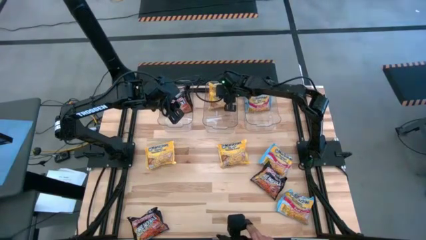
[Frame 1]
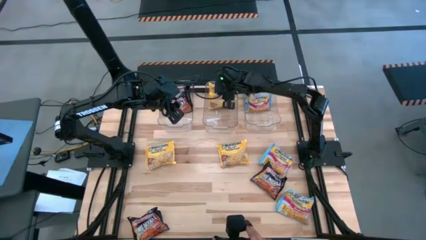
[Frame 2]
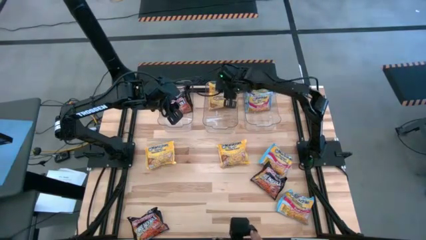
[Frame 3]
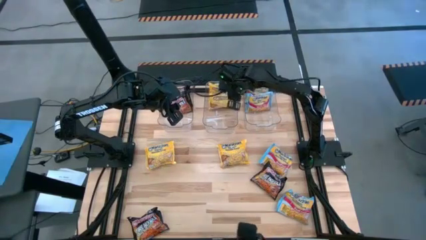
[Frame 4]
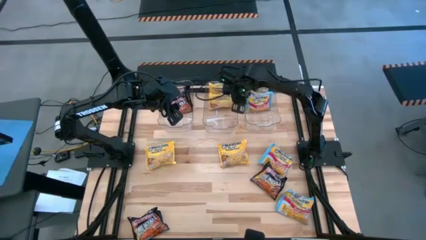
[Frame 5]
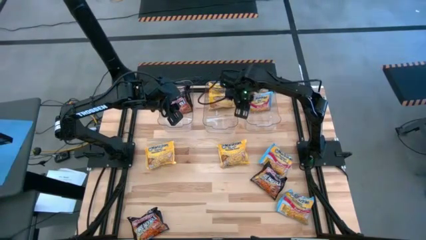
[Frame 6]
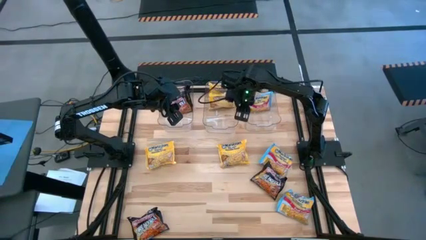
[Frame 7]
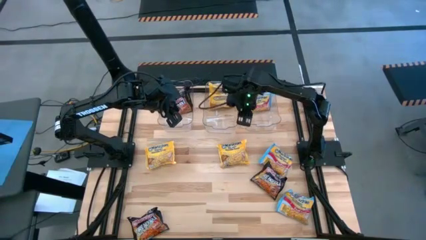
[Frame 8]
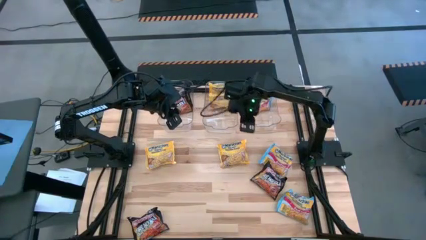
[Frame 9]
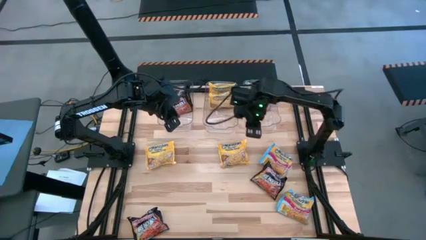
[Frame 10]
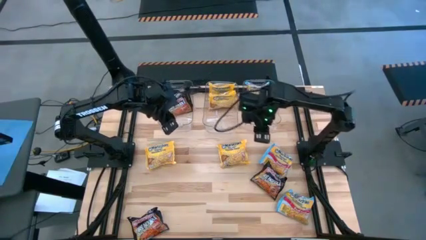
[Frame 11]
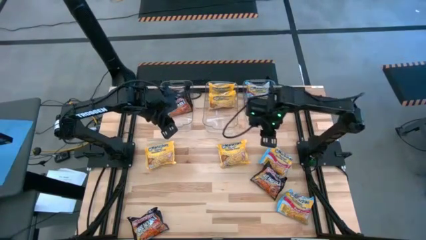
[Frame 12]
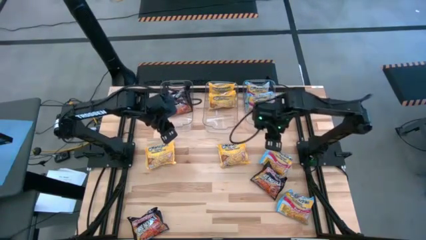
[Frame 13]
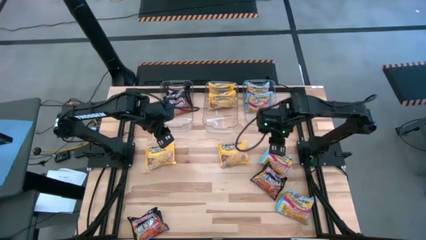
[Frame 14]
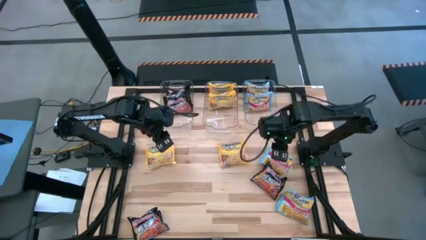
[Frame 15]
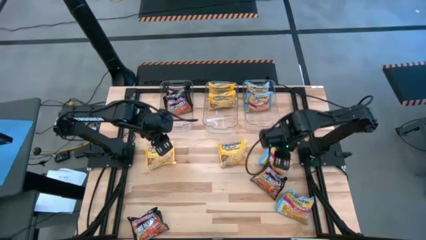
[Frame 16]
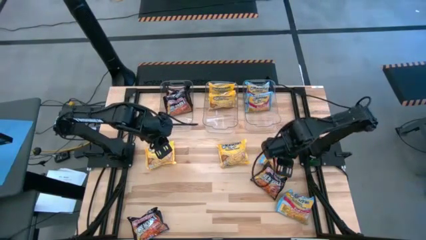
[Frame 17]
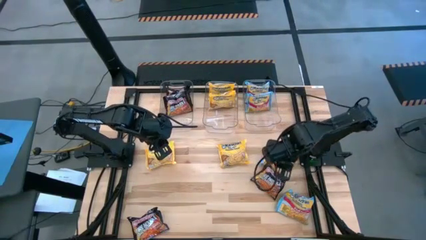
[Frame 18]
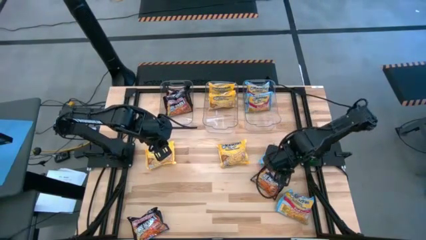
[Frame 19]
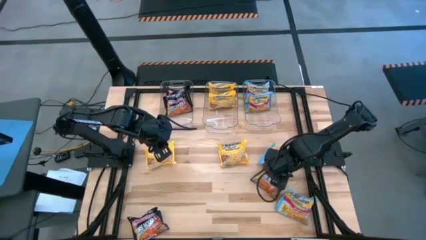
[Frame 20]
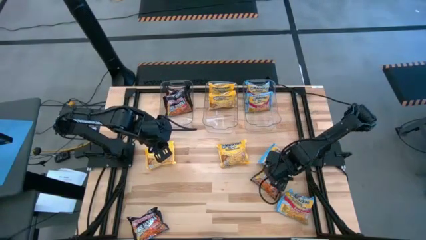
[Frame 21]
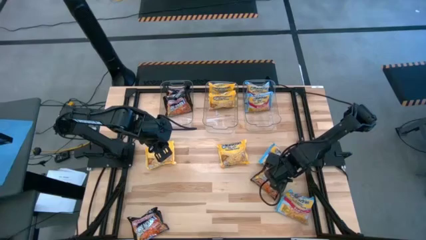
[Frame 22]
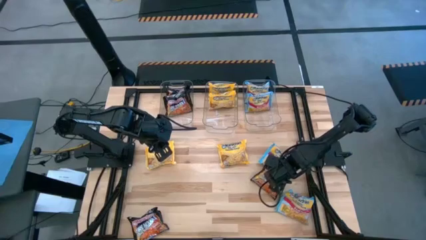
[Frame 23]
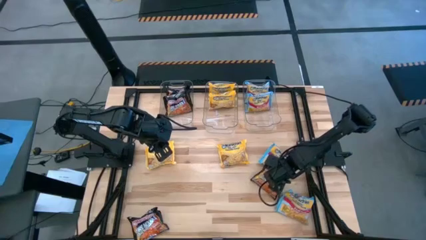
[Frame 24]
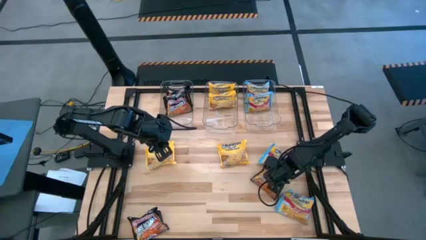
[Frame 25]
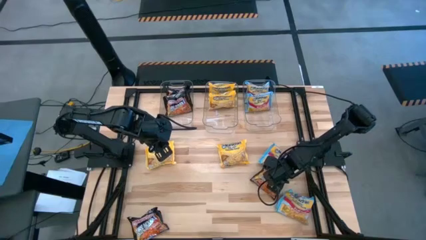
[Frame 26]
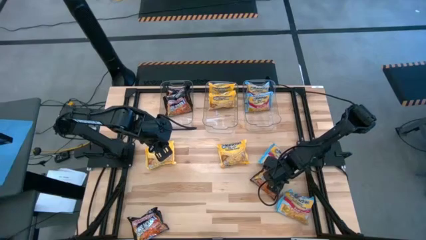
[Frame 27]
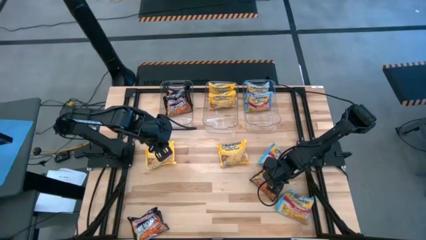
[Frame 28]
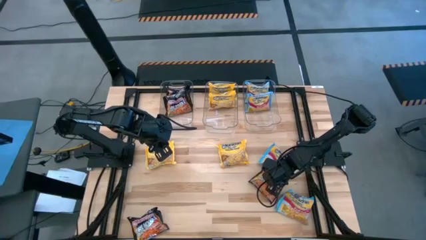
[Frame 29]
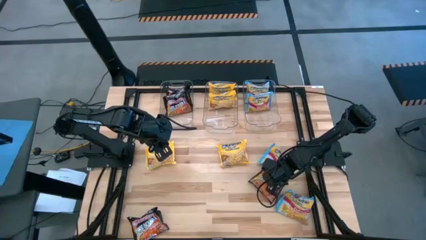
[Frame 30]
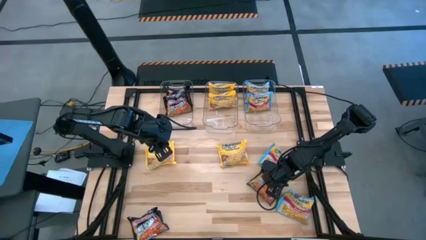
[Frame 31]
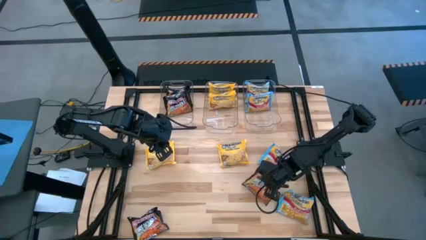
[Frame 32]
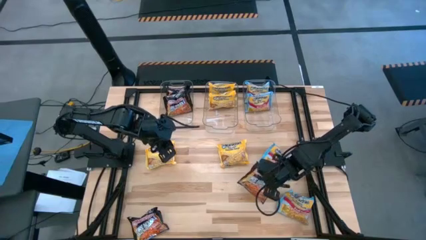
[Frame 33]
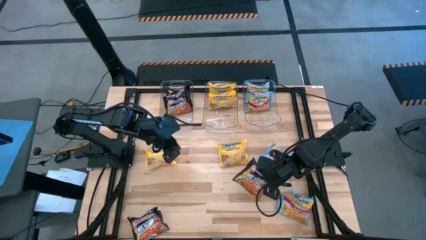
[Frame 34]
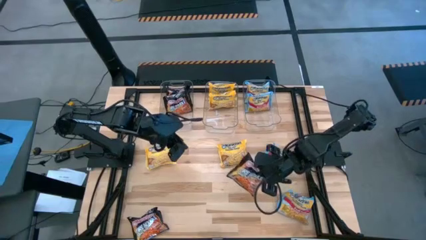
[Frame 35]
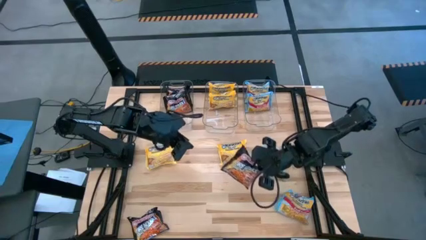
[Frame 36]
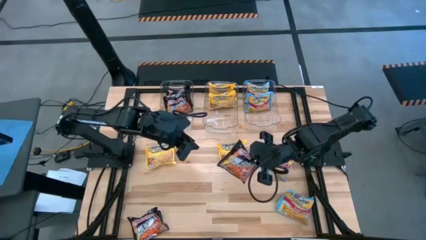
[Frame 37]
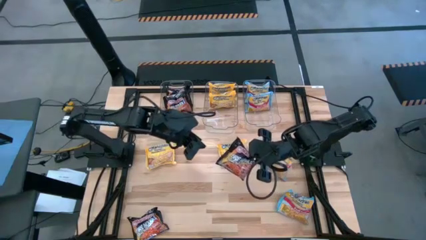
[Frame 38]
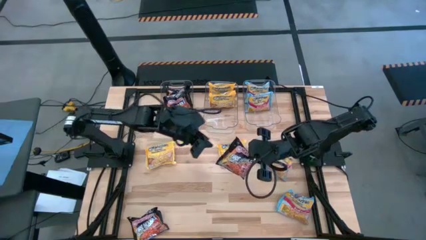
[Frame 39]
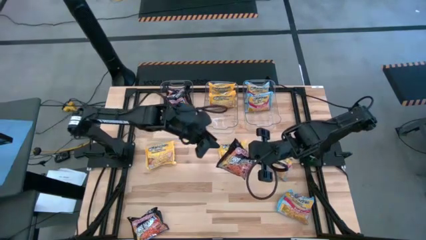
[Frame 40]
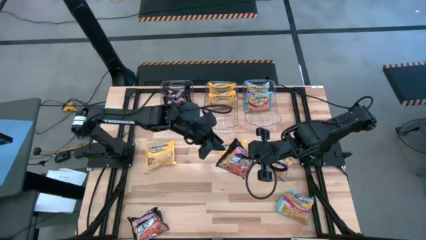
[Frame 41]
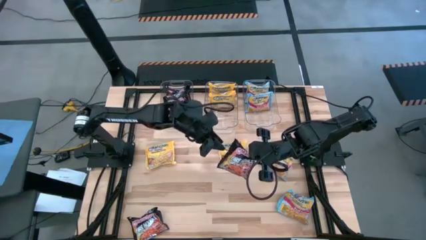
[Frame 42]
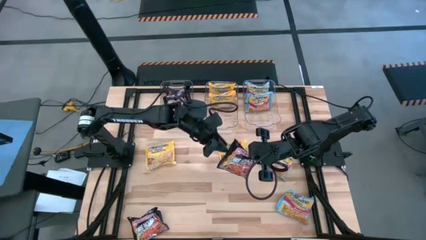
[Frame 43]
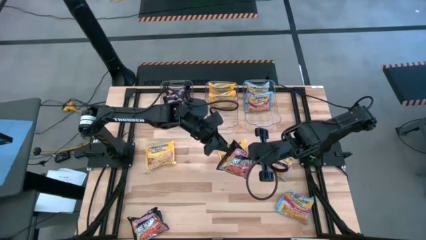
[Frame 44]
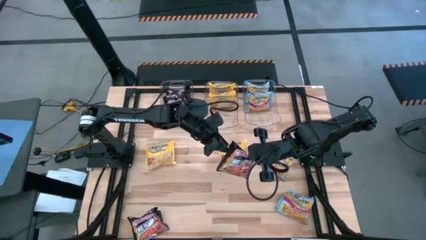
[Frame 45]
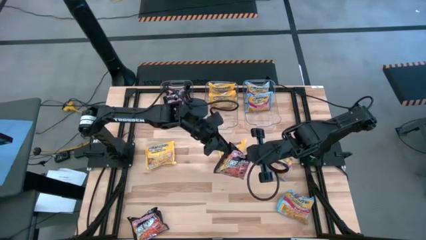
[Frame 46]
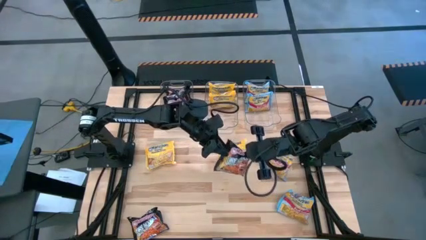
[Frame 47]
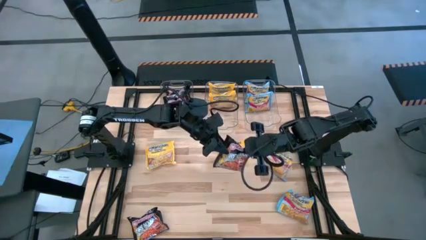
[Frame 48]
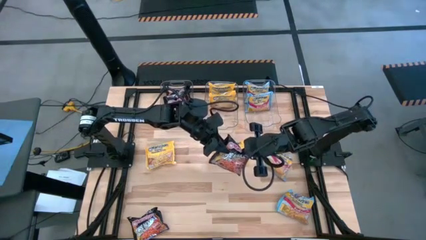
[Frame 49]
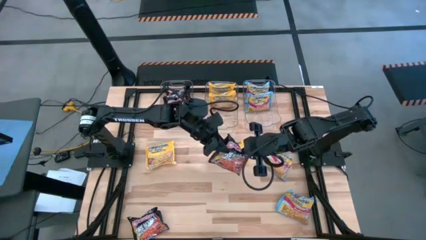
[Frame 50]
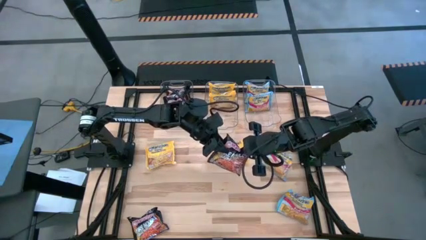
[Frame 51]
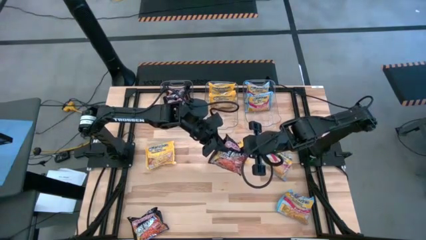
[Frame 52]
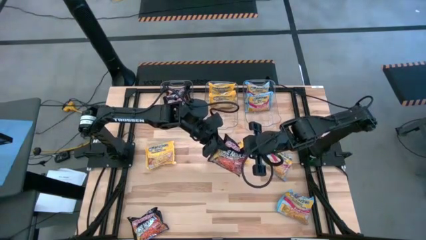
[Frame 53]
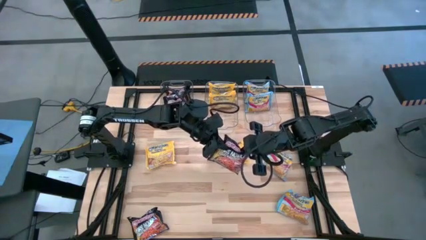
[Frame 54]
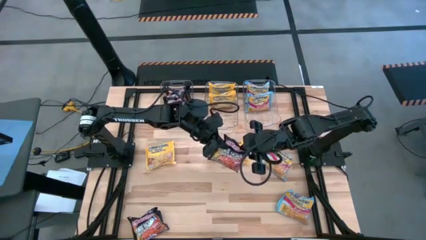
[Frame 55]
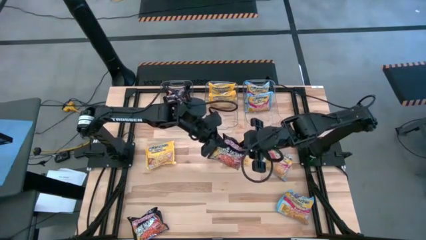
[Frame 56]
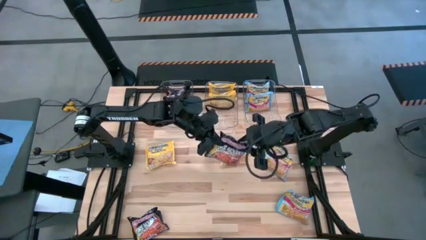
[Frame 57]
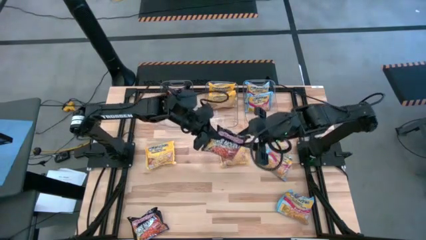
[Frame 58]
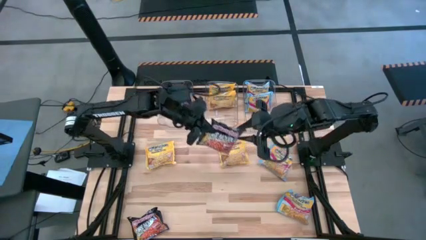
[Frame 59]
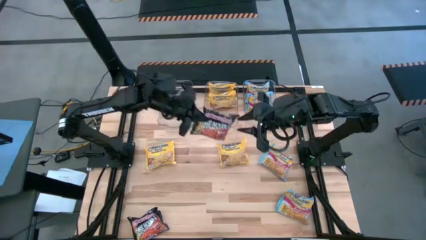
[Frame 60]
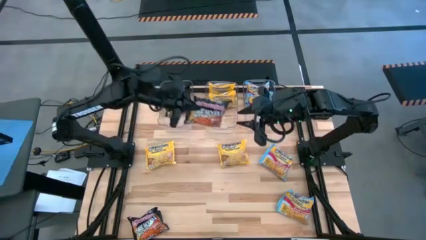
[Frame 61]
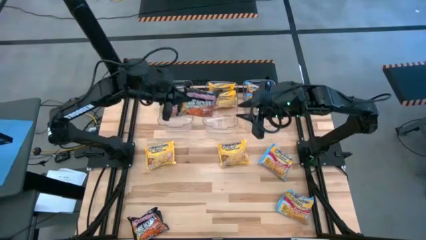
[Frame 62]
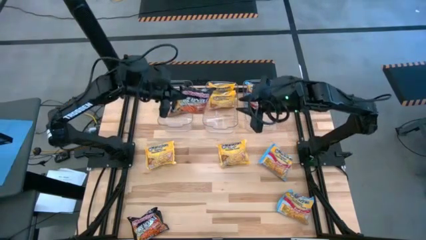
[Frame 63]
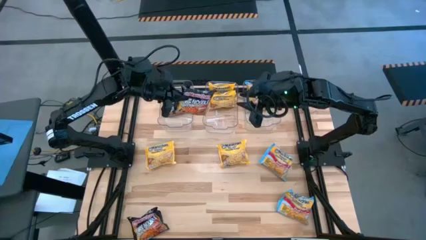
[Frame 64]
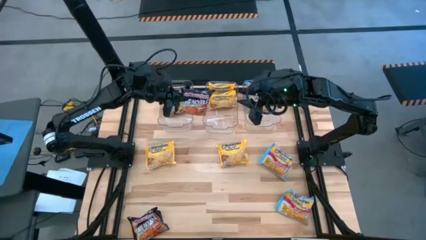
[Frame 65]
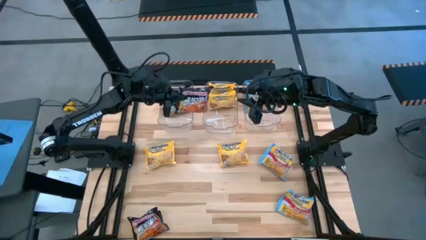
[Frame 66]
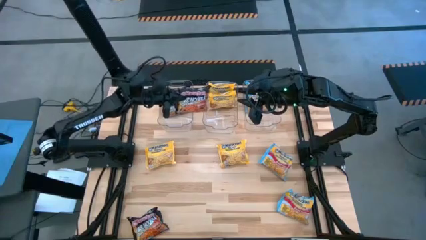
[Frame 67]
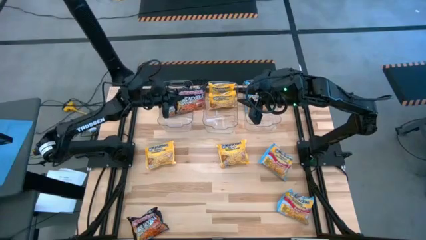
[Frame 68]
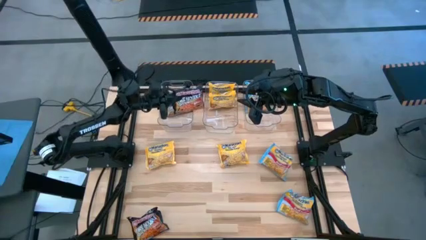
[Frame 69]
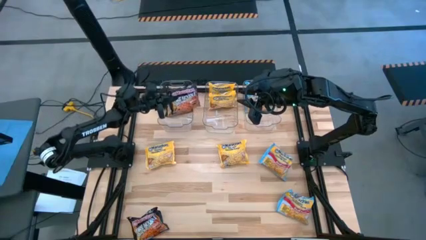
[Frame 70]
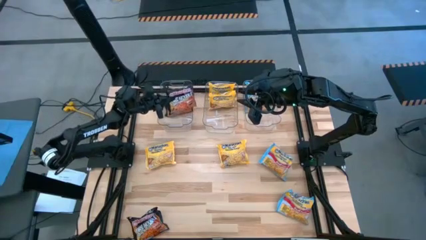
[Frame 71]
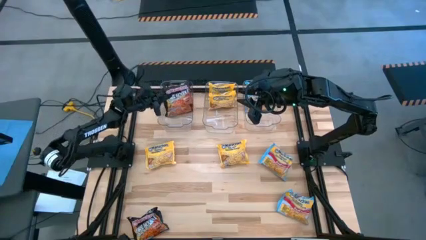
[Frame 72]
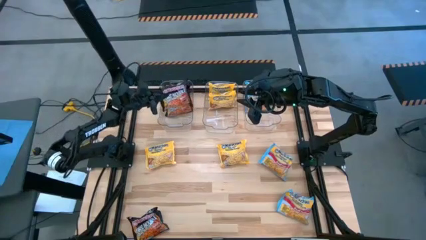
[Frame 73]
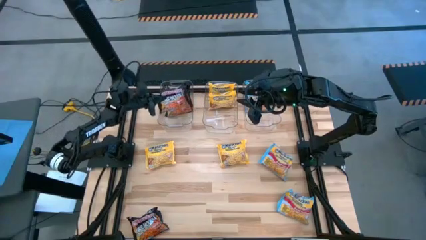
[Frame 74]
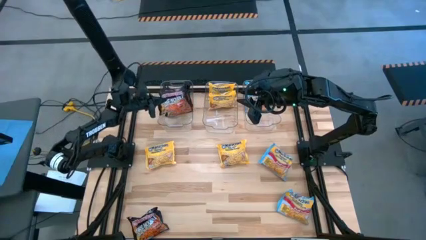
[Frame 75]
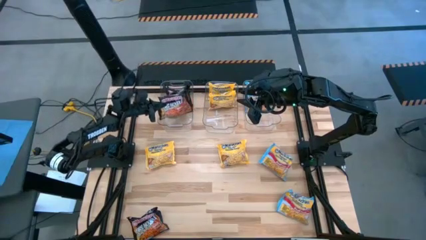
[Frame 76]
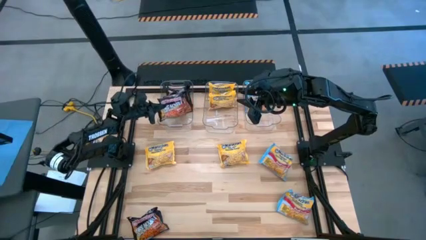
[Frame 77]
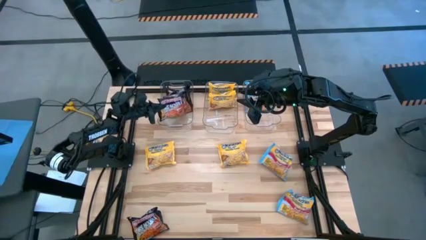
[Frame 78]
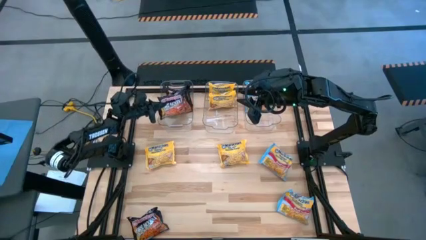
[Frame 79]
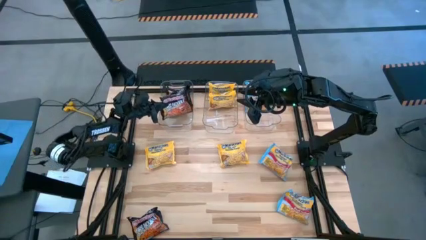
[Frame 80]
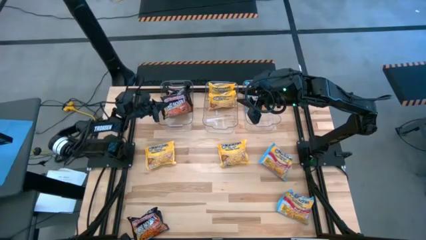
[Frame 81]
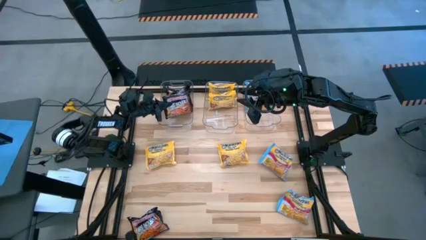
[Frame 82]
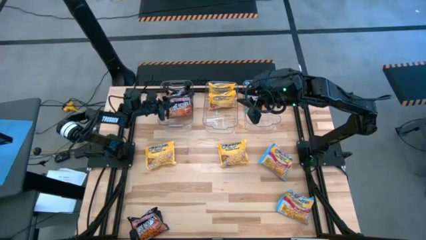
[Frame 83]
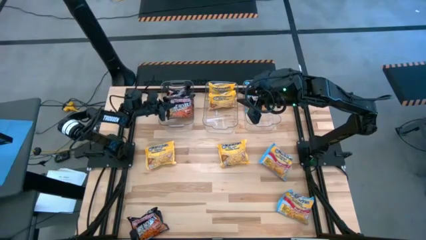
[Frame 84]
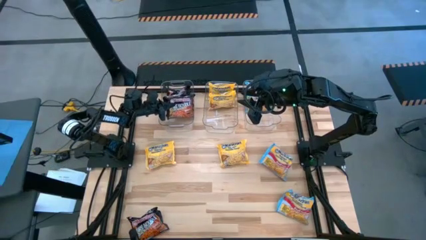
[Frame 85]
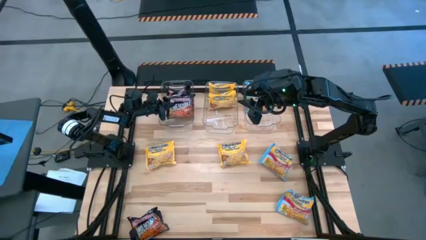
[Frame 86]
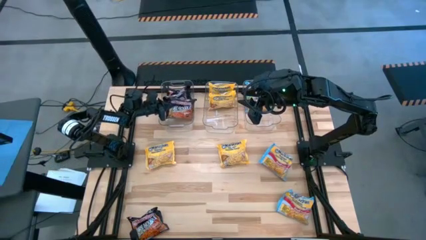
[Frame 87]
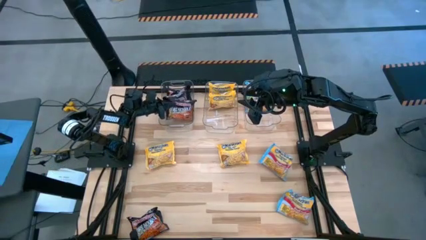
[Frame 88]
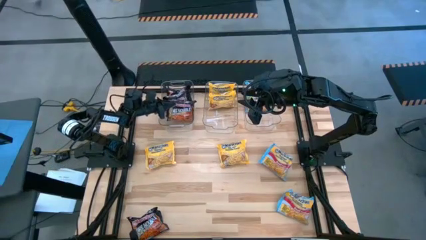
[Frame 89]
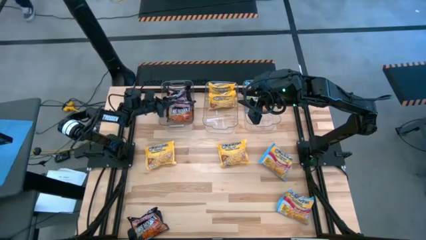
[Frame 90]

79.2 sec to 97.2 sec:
Task: Sort Maruchan noodles
Put the black noodle pack into the left transparent bin
